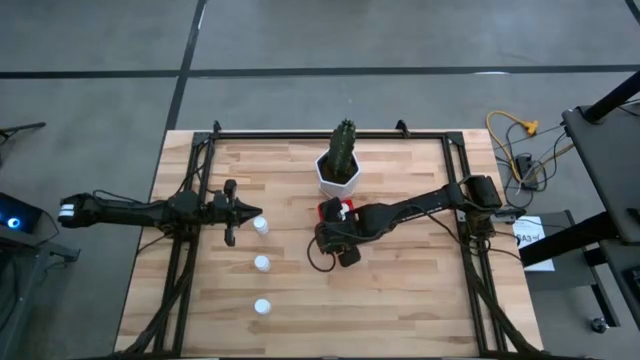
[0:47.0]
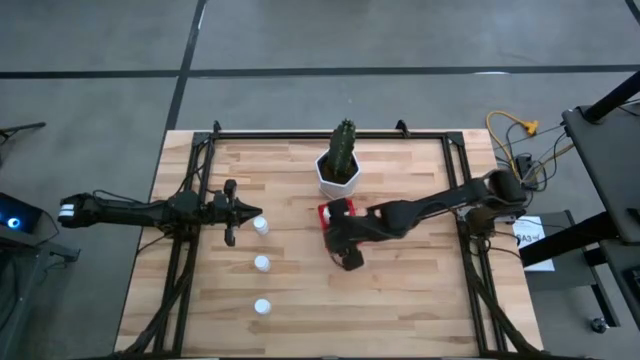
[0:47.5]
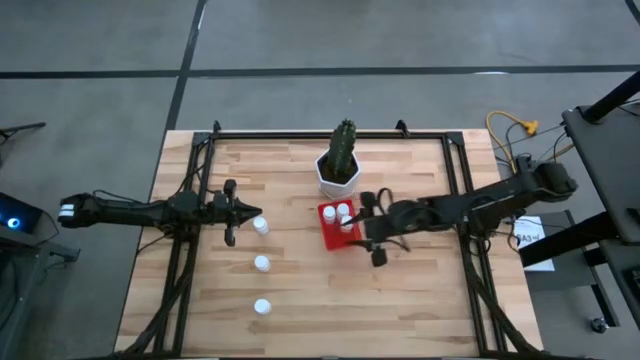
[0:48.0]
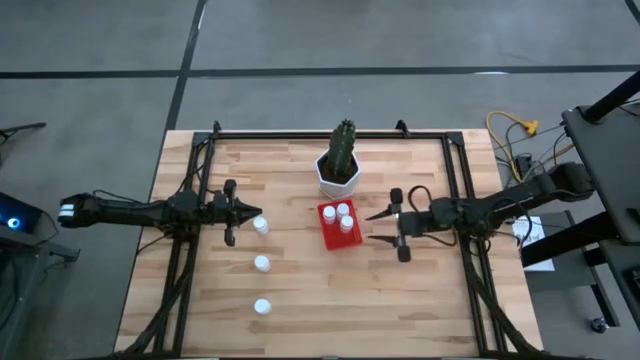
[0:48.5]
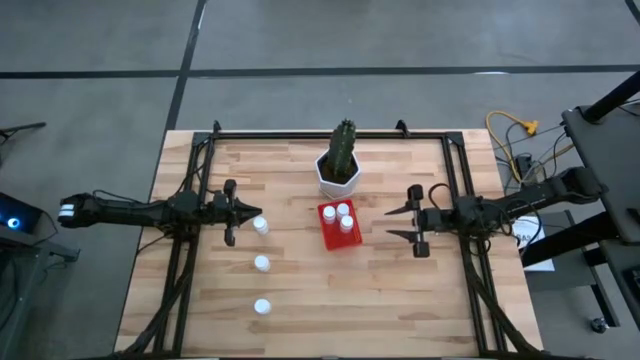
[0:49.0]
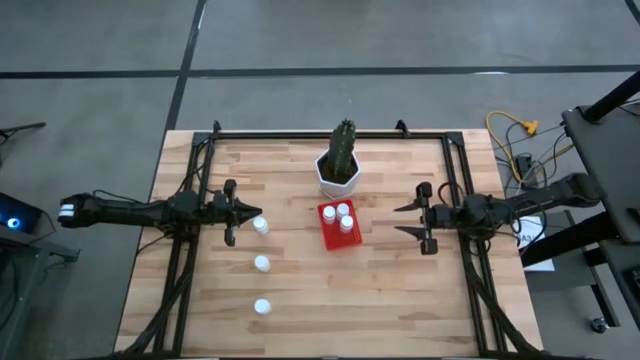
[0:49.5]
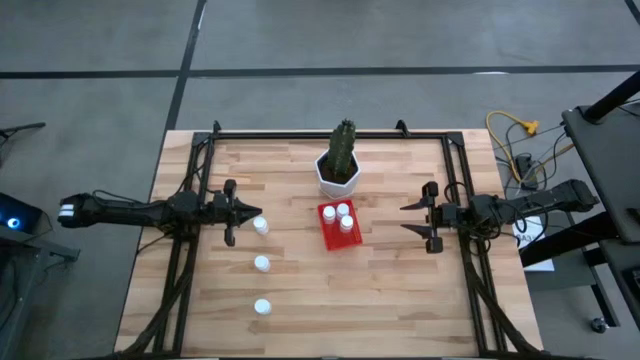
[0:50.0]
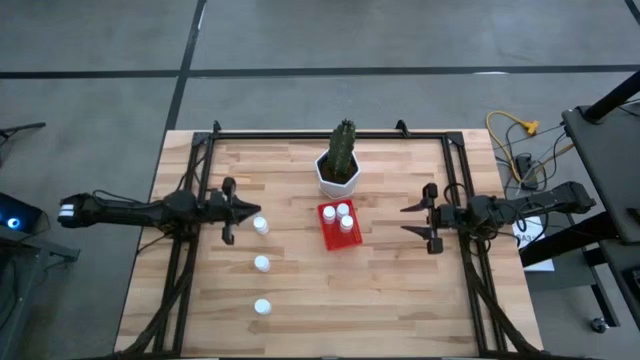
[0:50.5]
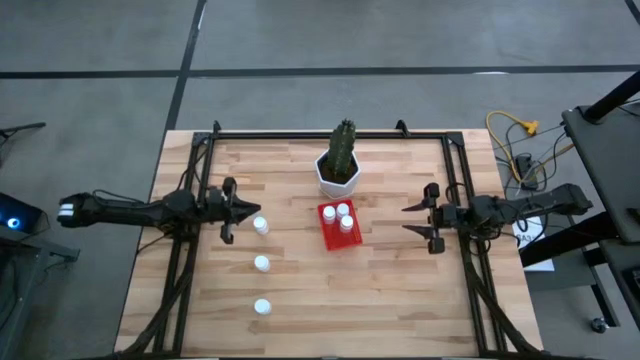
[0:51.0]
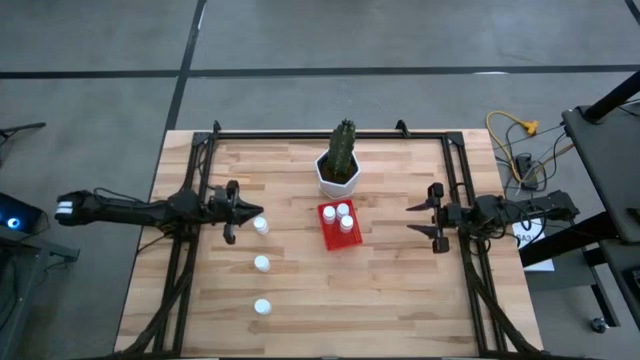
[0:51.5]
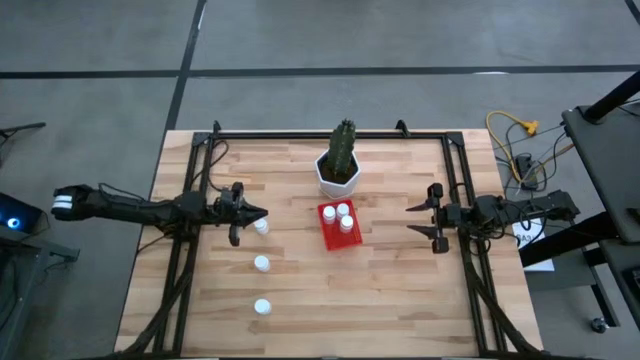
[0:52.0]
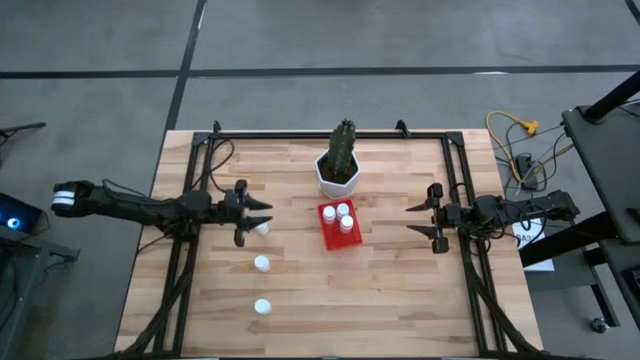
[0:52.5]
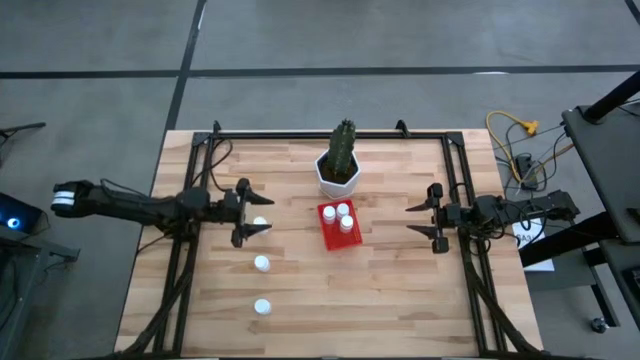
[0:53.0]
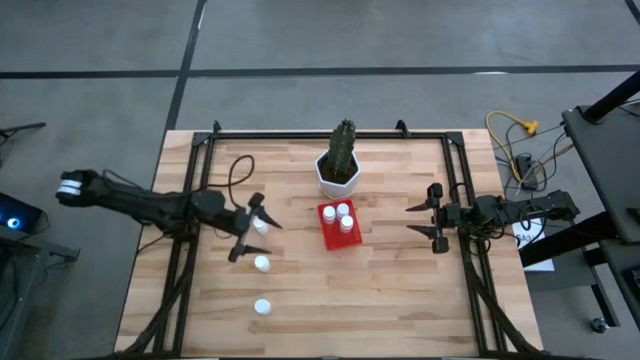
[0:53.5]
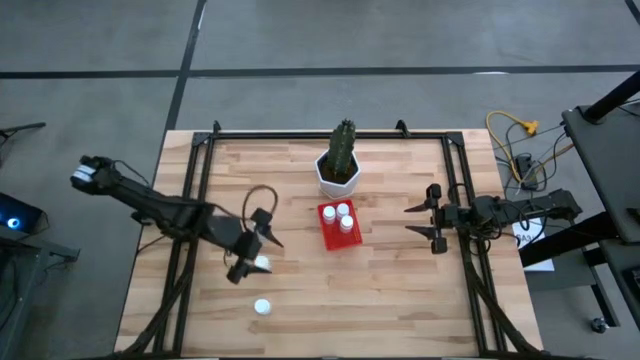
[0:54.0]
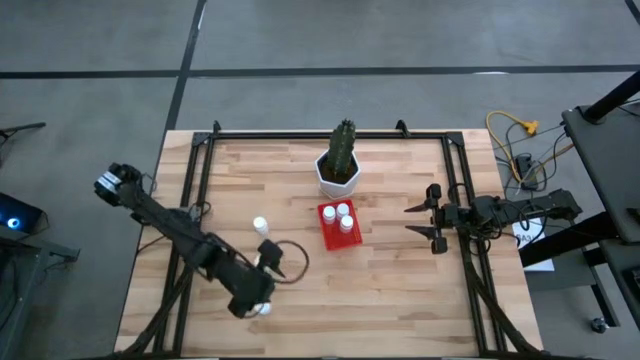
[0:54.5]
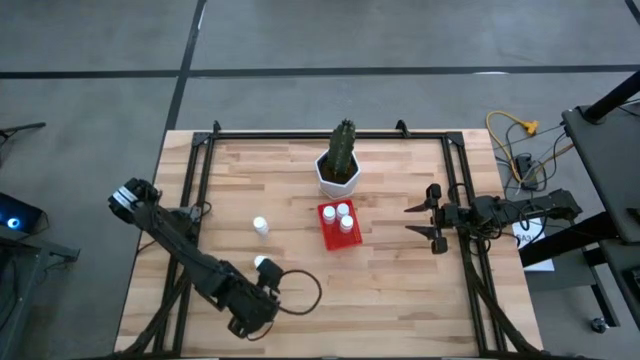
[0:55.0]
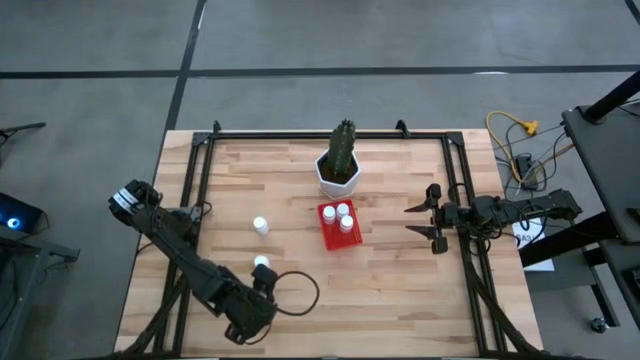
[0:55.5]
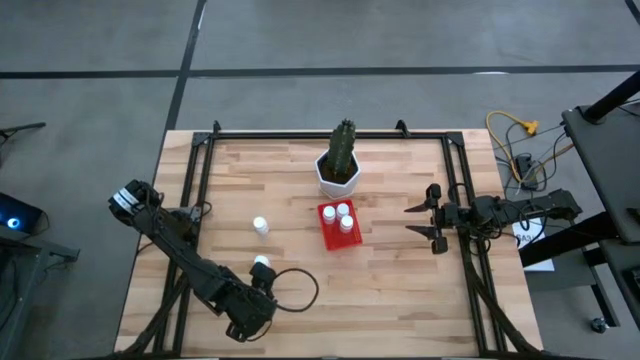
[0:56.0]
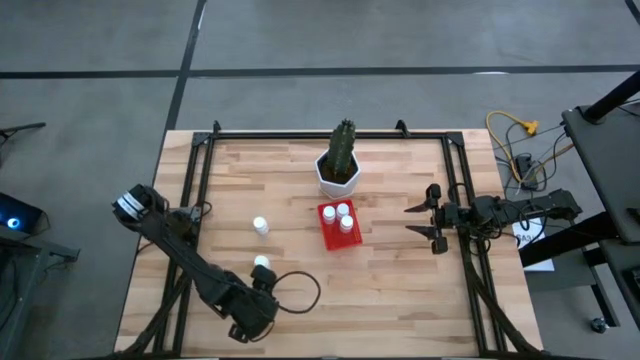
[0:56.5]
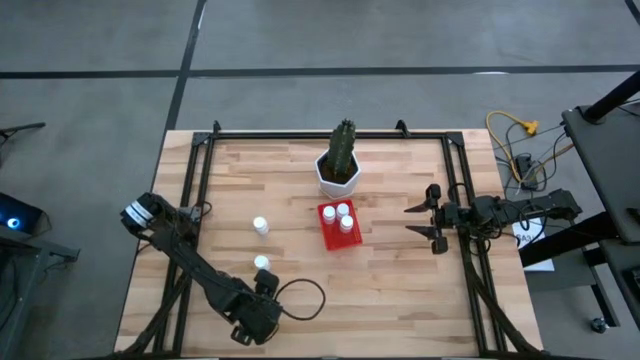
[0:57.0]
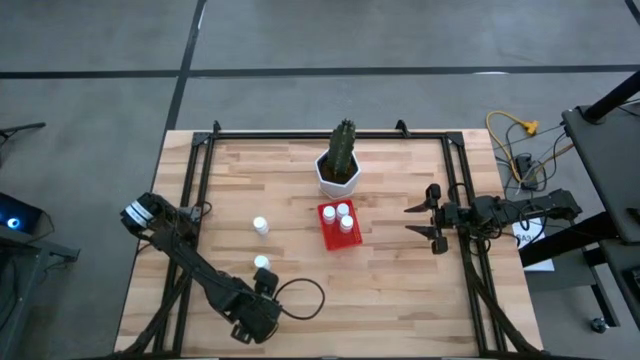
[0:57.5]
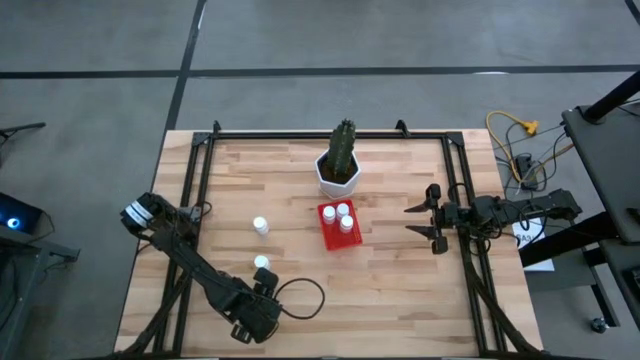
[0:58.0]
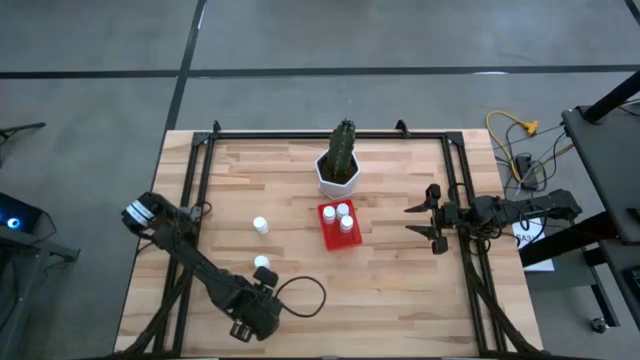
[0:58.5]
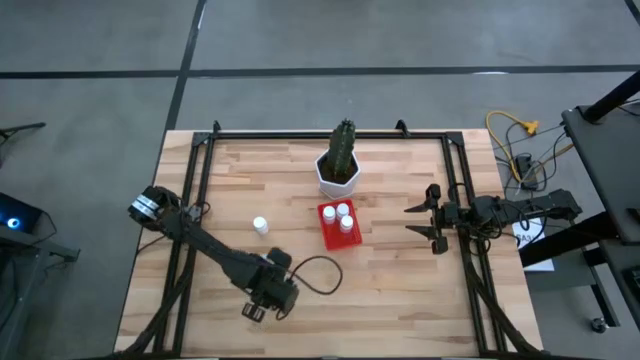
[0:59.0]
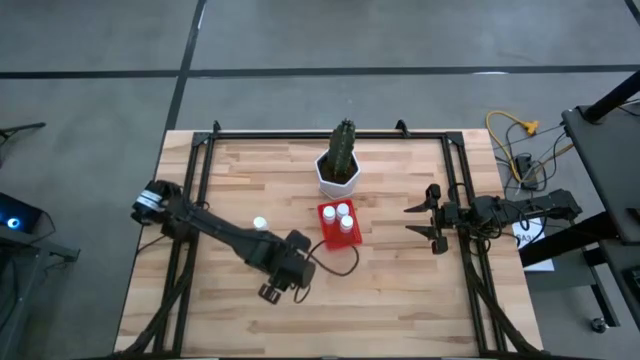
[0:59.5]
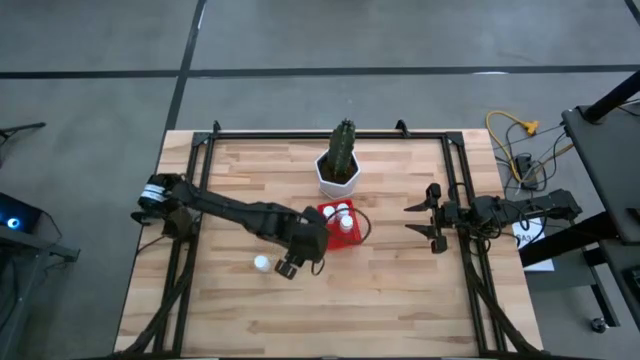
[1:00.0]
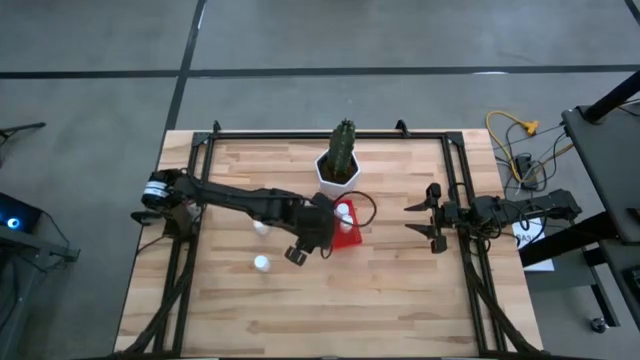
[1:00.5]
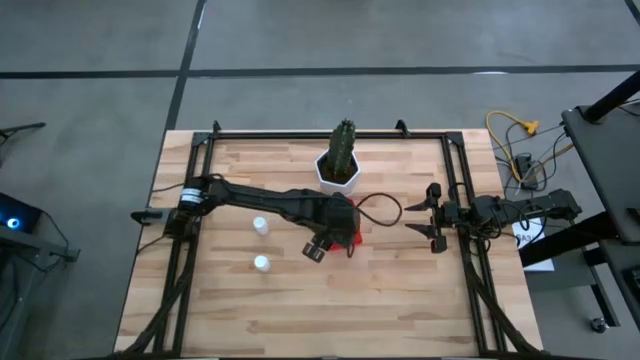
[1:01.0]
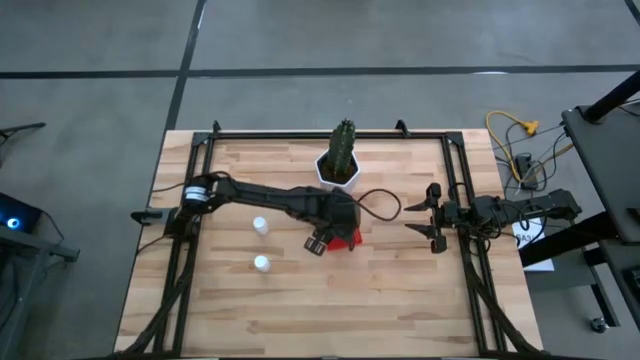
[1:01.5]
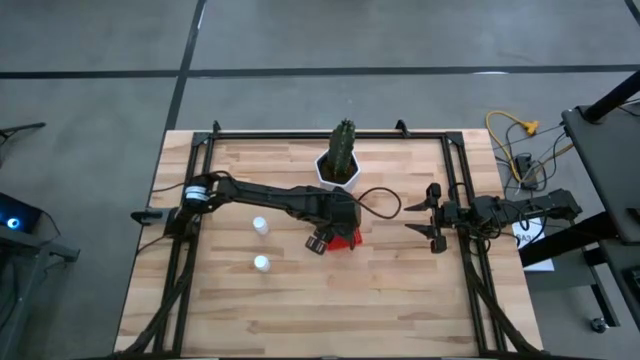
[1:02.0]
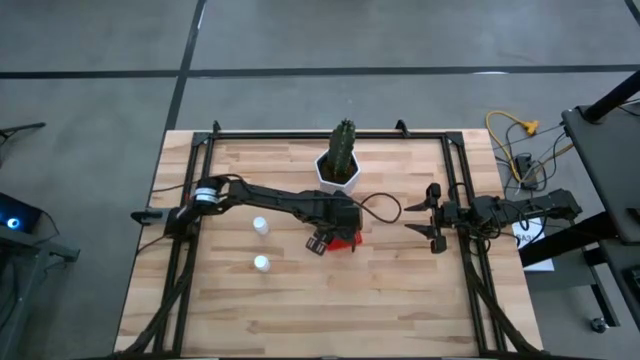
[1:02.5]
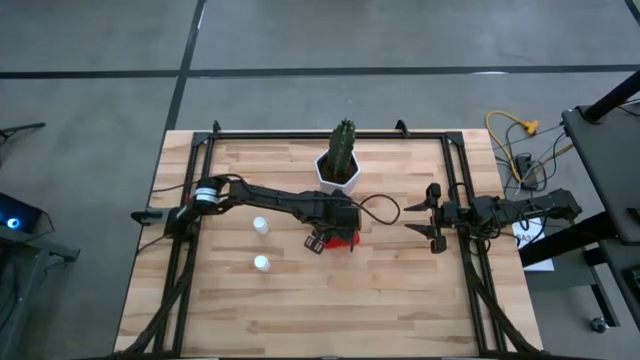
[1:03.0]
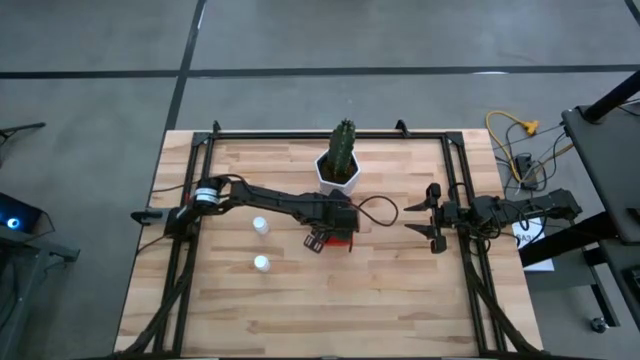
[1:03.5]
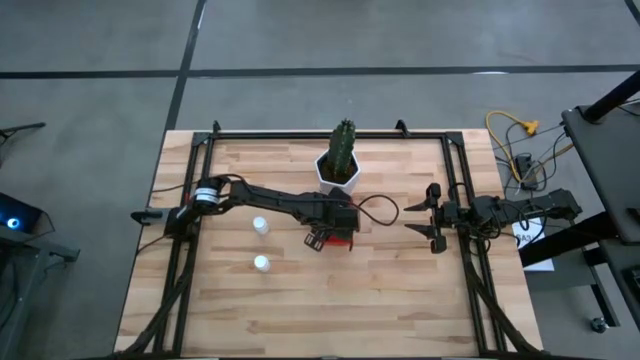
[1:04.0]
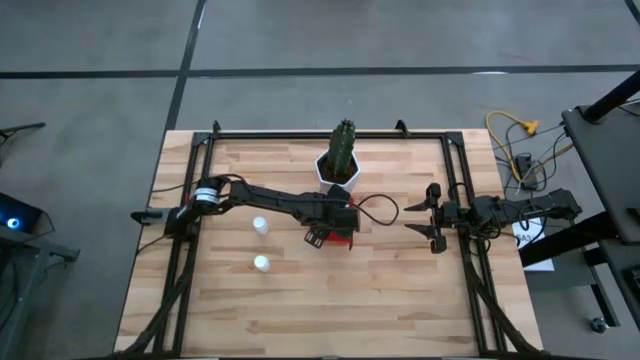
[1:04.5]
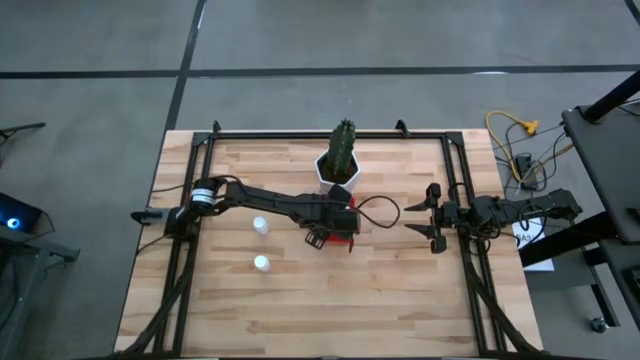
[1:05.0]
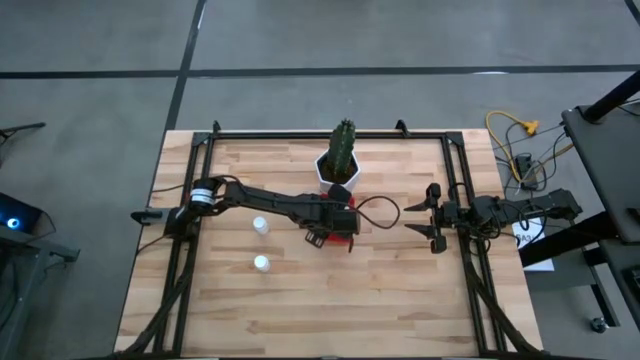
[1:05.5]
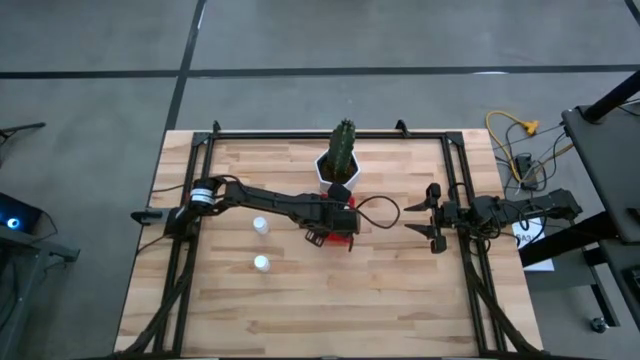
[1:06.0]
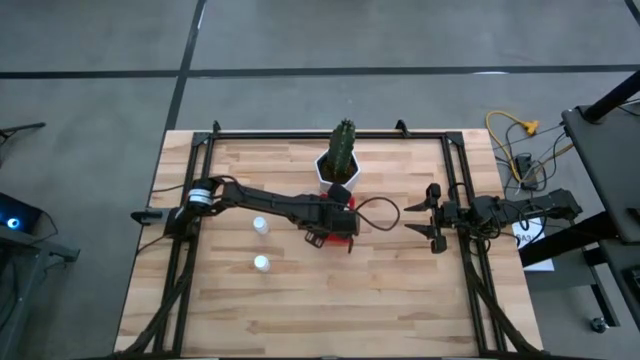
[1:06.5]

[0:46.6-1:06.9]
Task: Pick and place pill bottles into a basket
Put the white pill bottle into the red bin

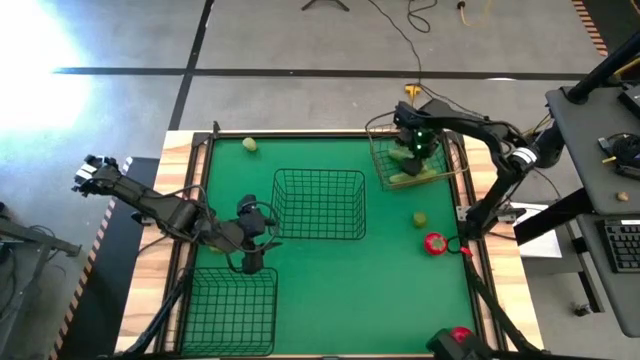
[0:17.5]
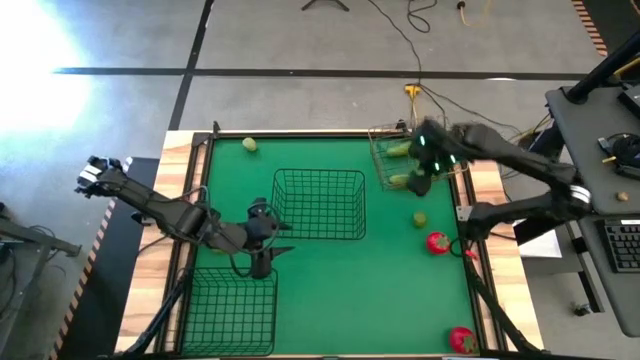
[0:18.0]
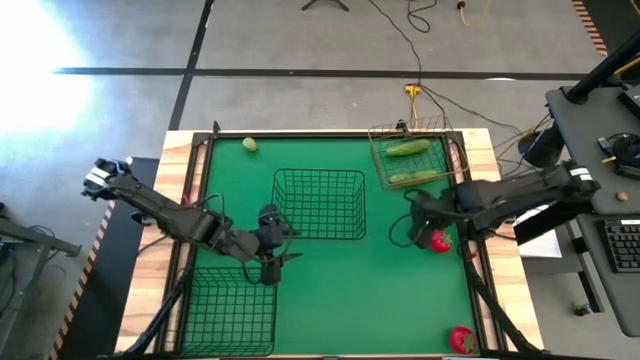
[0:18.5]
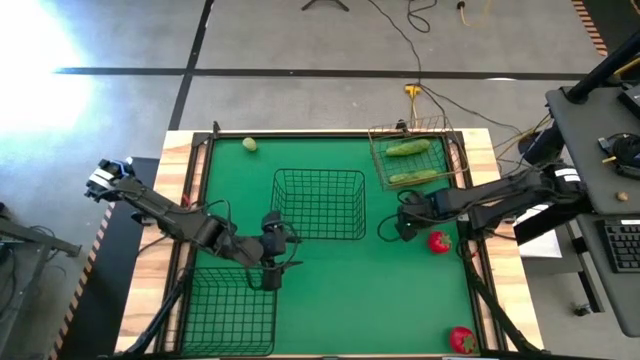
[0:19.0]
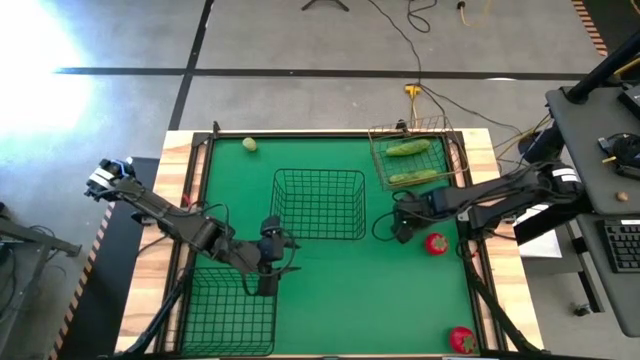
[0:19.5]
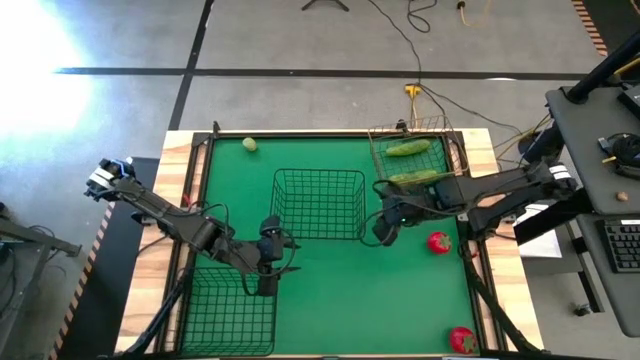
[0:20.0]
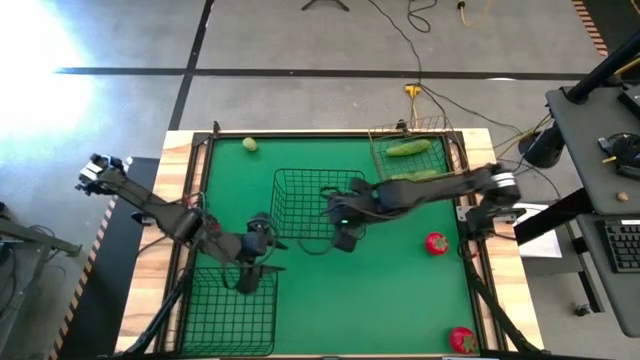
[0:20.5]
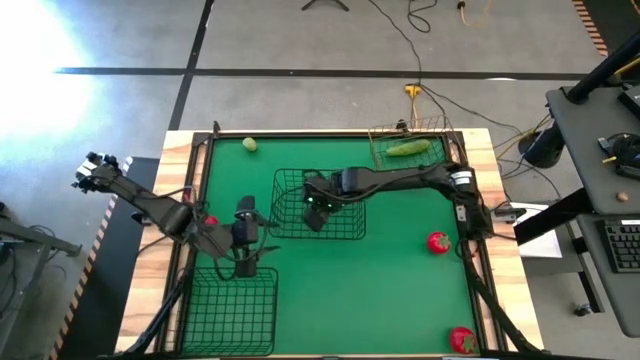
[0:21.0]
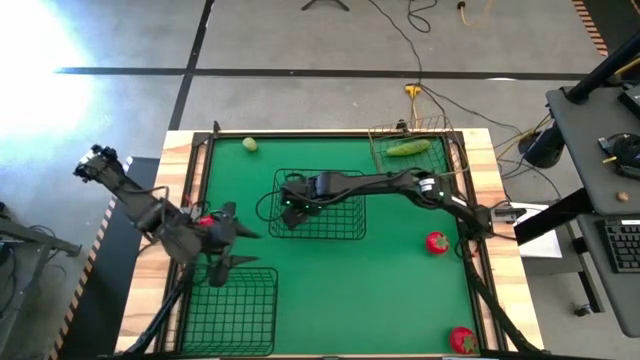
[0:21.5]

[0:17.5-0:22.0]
Task: Sort produce into baskets
Put the bottom right green lime into the top black wire basket
